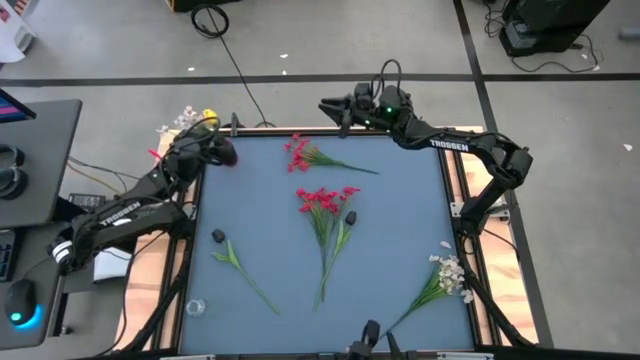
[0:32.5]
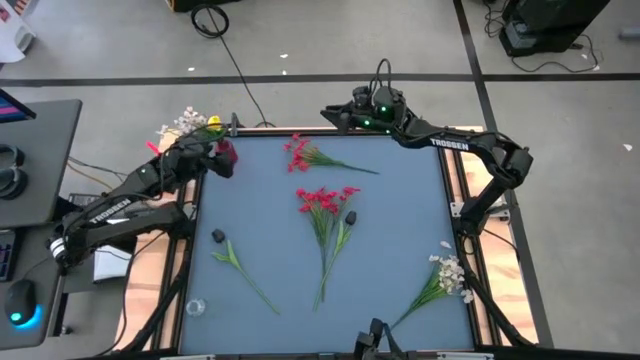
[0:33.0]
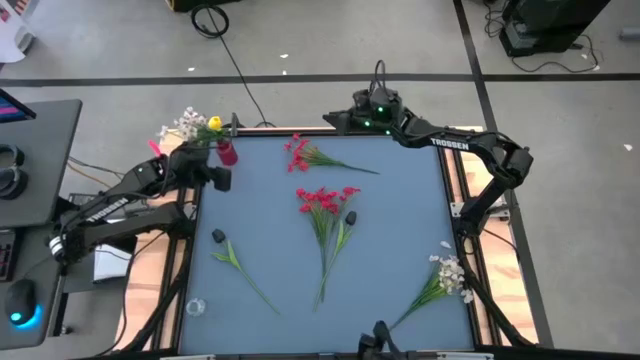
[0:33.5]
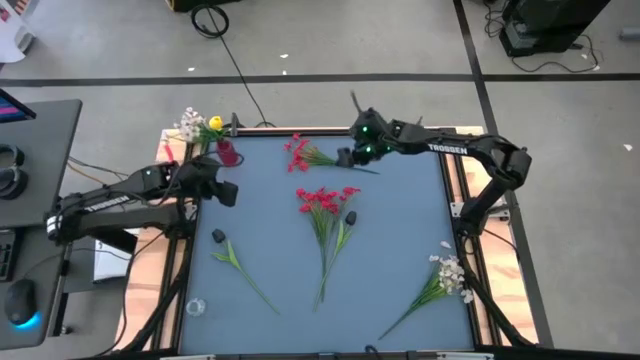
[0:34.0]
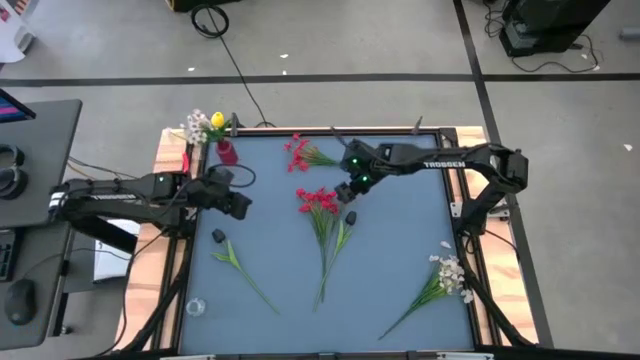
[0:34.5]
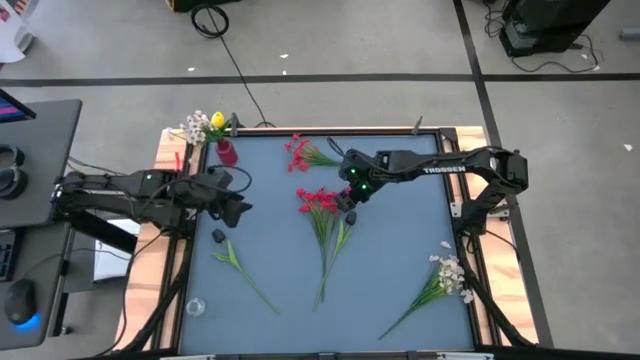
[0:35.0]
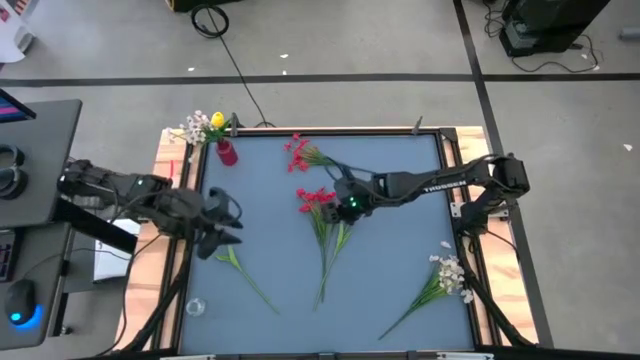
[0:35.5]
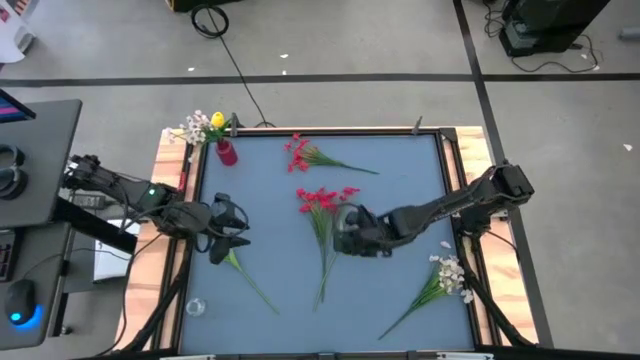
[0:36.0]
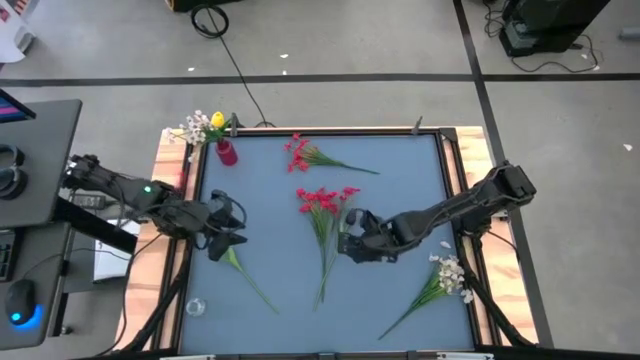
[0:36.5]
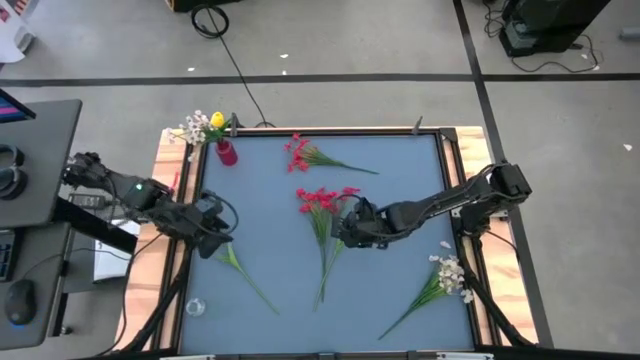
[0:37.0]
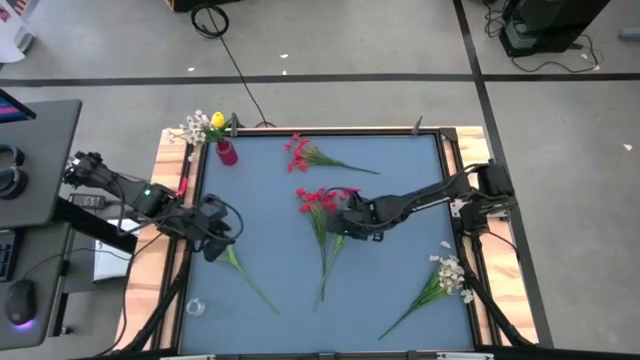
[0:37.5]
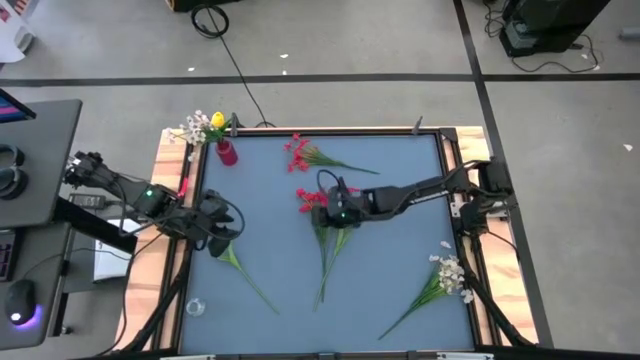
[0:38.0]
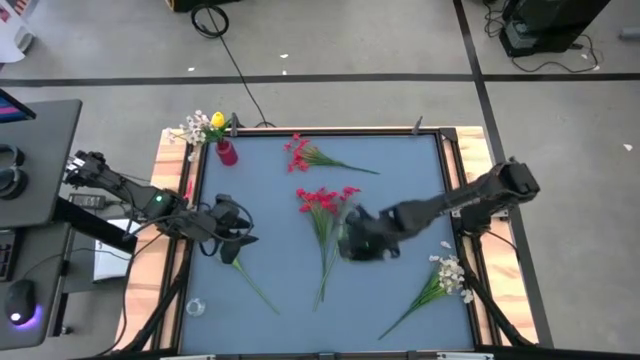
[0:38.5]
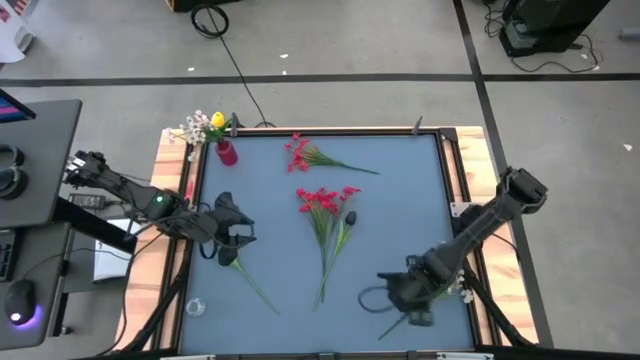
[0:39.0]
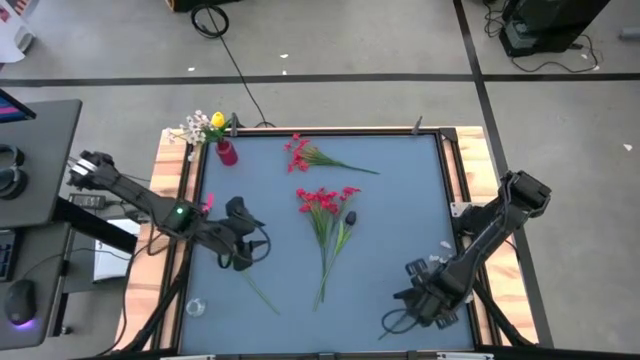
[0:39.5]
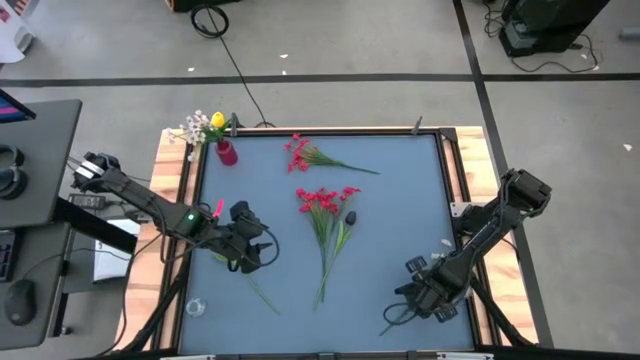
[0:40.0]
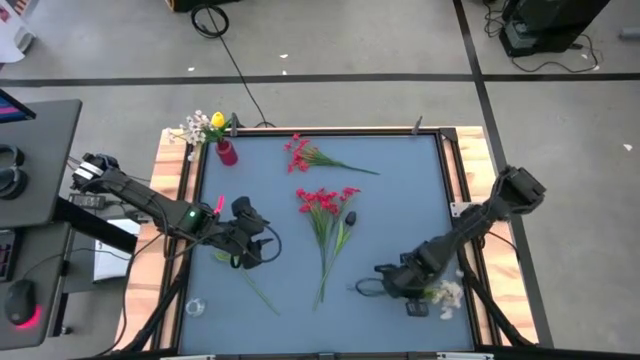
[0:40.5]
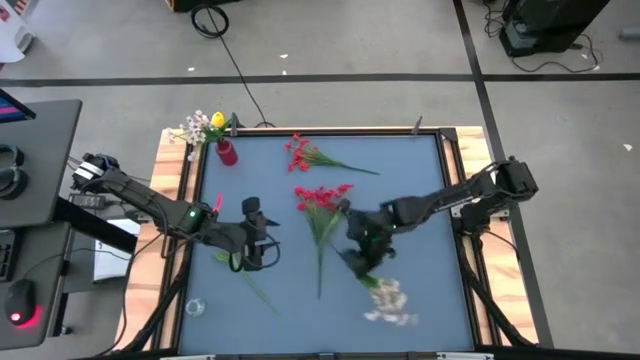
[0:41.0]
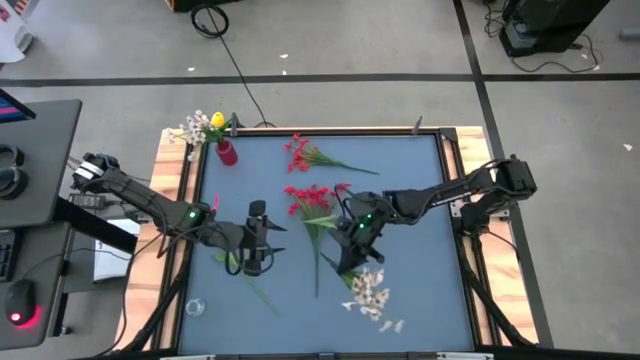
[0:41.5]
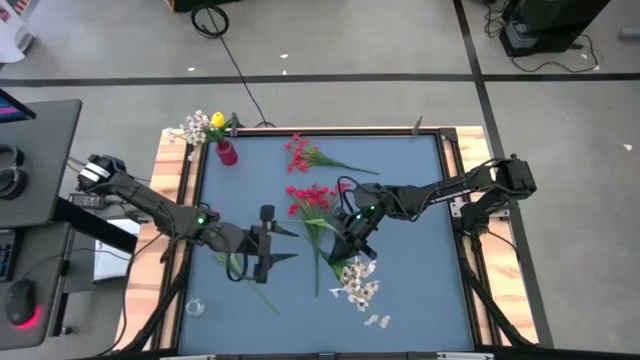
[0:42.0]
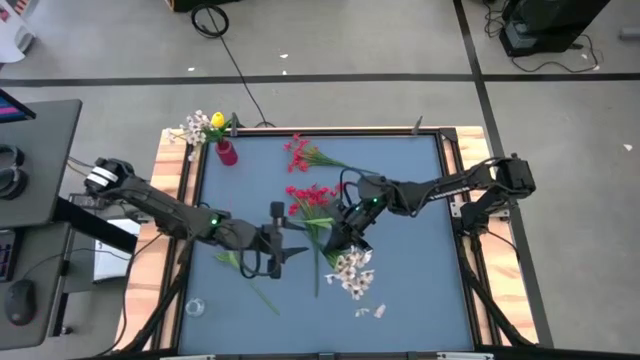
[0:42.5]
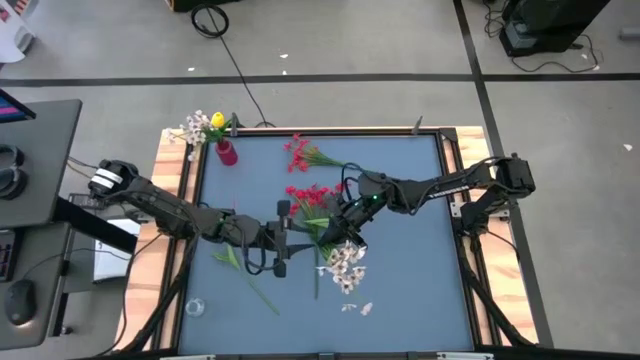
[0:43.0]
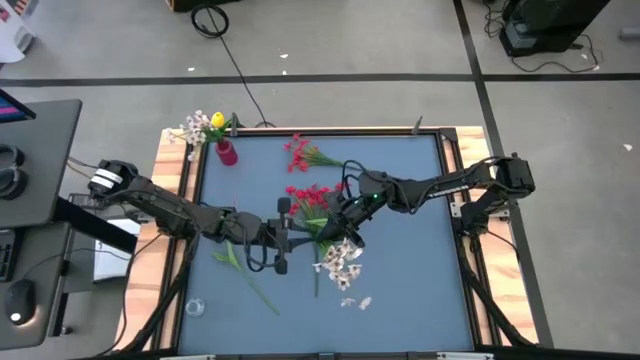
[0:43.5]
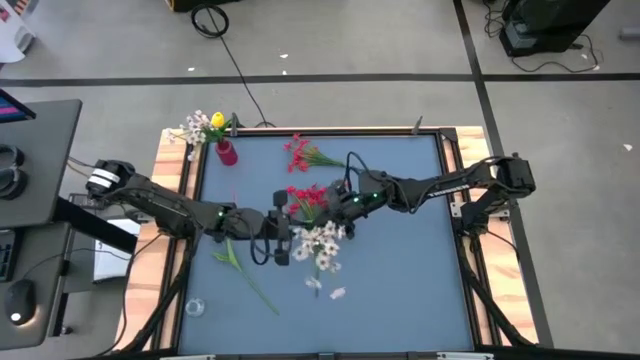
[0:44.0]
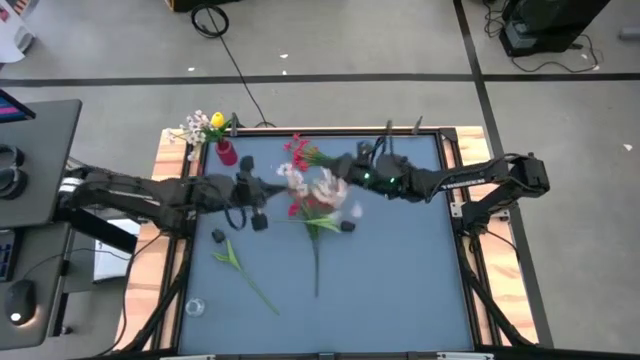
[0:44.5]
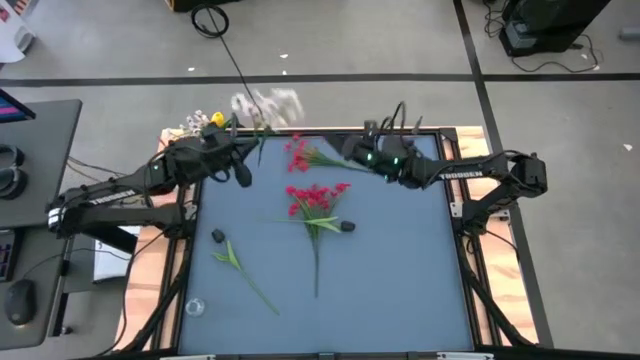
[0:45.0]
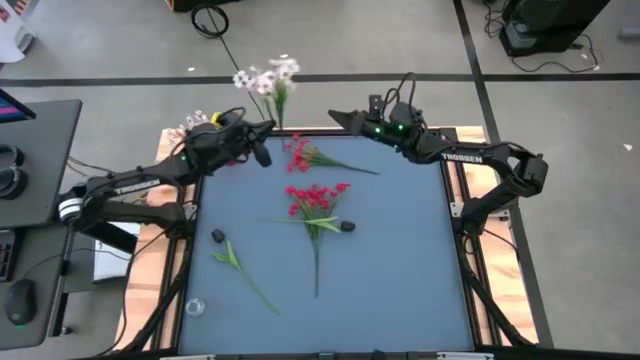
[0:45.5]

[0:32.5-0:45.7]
Task: Sort flowers into vase by color
Put the white flowers into the red vase
